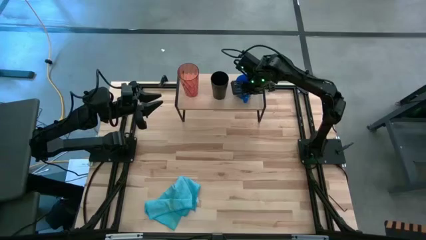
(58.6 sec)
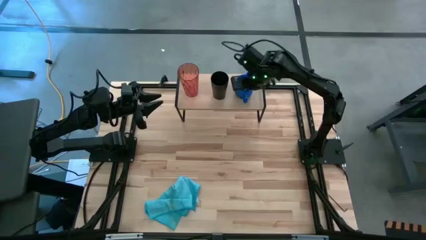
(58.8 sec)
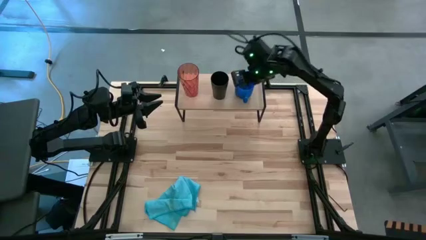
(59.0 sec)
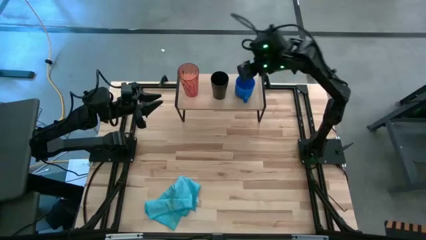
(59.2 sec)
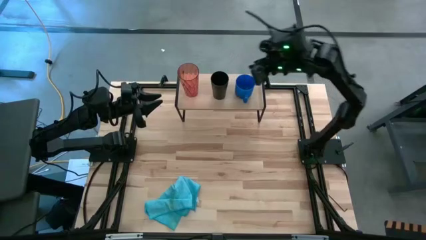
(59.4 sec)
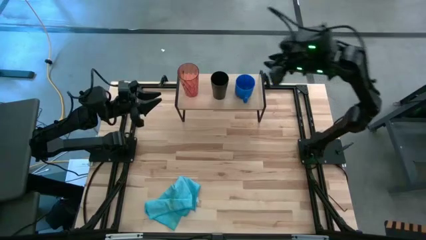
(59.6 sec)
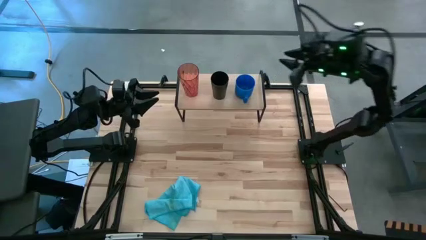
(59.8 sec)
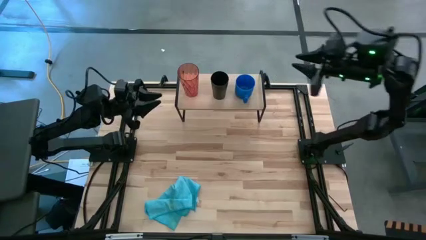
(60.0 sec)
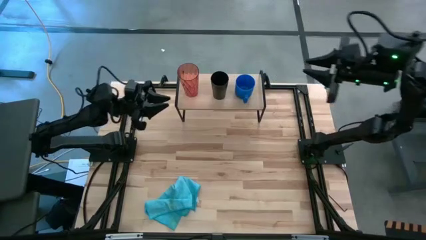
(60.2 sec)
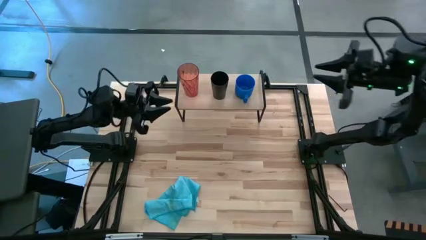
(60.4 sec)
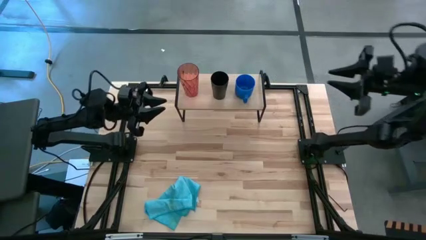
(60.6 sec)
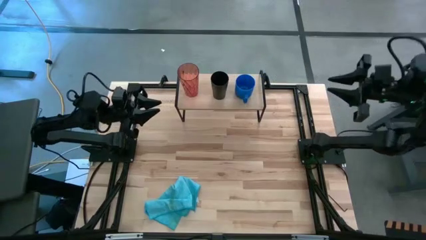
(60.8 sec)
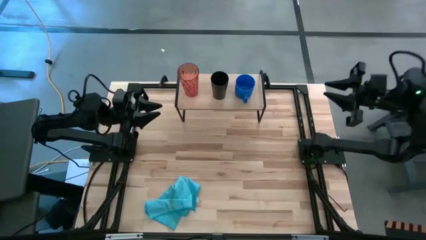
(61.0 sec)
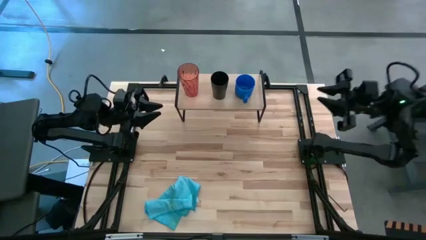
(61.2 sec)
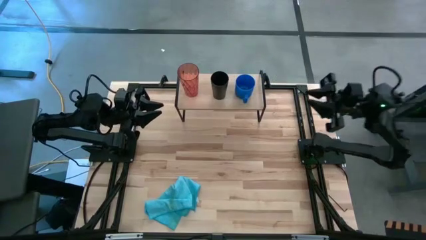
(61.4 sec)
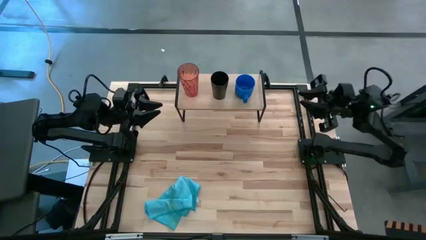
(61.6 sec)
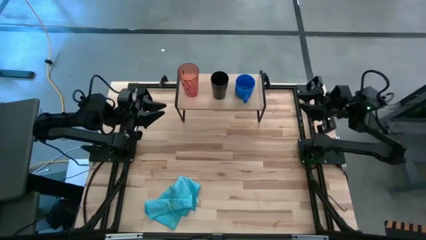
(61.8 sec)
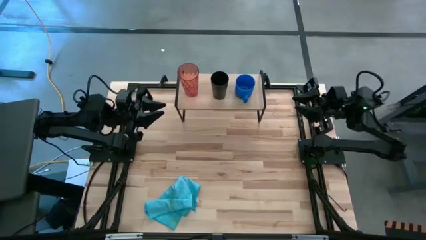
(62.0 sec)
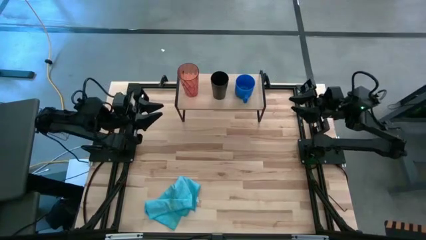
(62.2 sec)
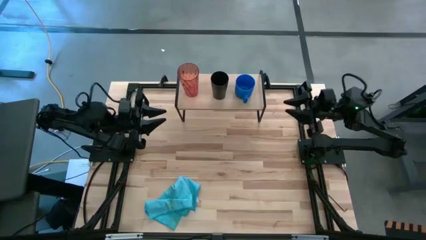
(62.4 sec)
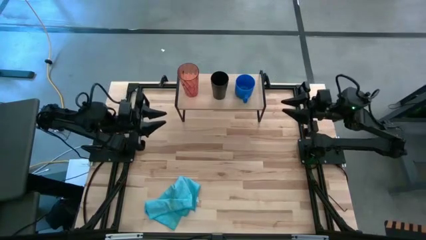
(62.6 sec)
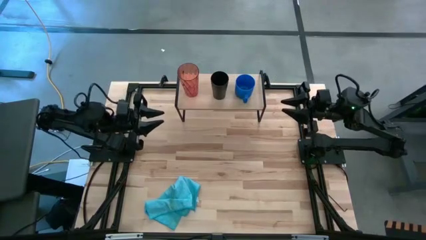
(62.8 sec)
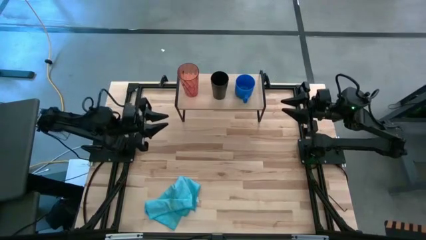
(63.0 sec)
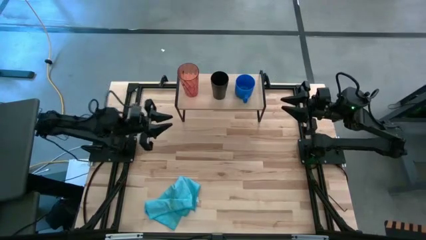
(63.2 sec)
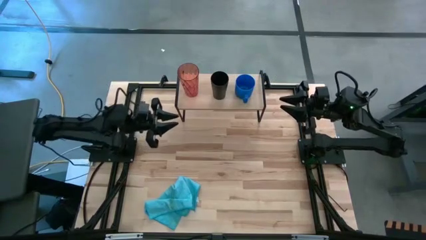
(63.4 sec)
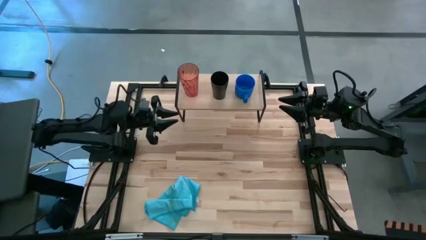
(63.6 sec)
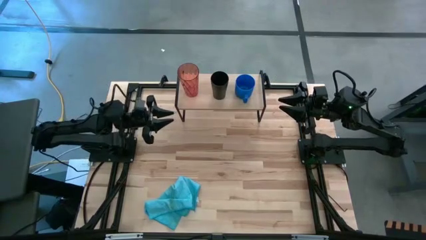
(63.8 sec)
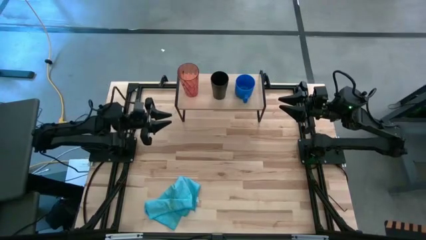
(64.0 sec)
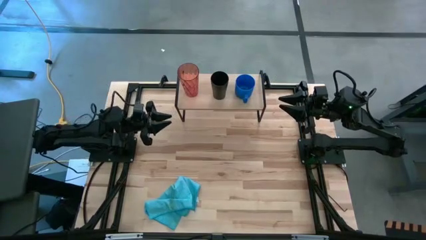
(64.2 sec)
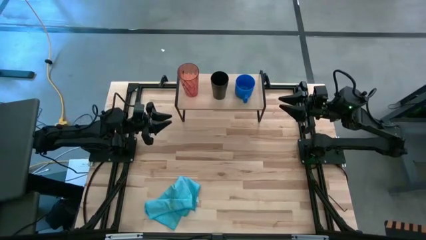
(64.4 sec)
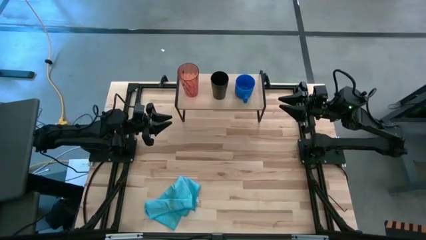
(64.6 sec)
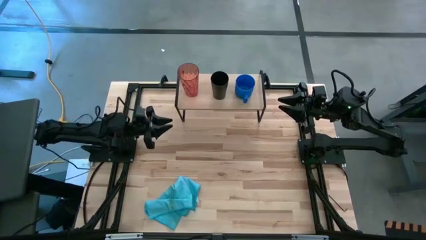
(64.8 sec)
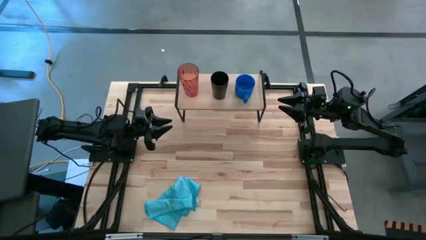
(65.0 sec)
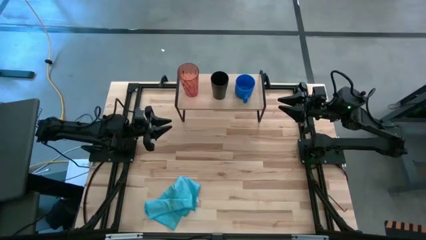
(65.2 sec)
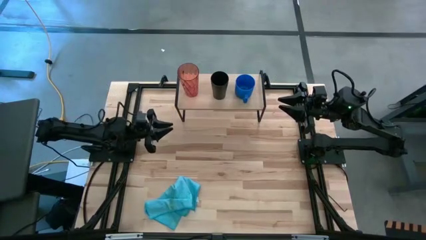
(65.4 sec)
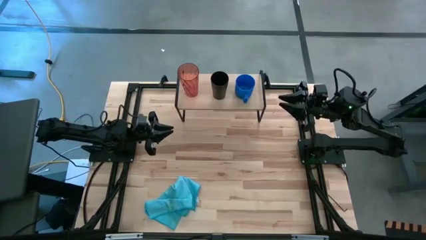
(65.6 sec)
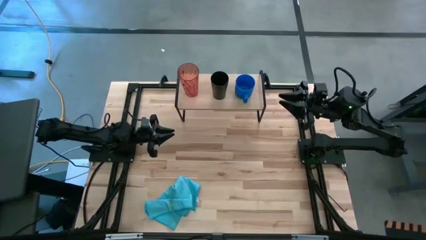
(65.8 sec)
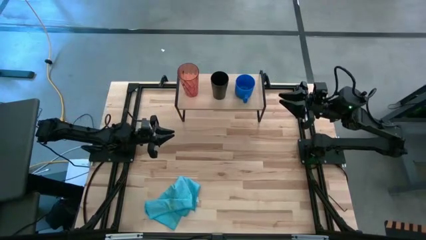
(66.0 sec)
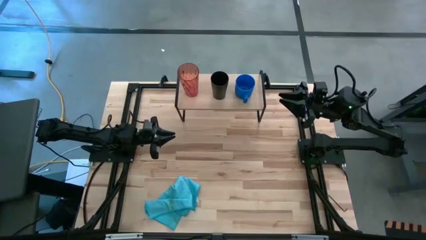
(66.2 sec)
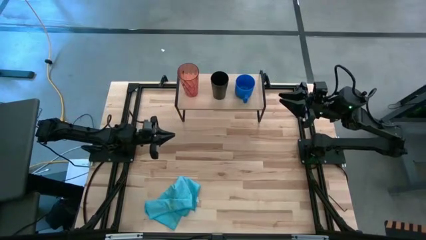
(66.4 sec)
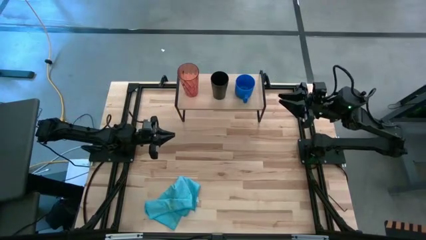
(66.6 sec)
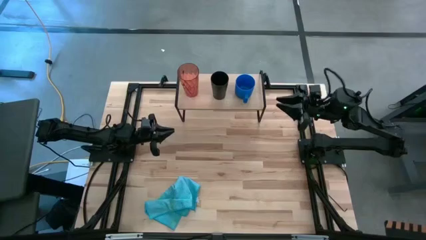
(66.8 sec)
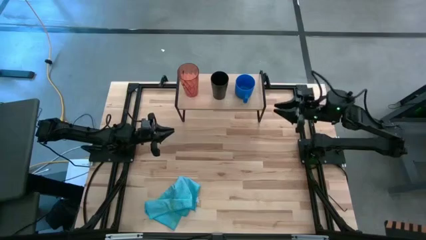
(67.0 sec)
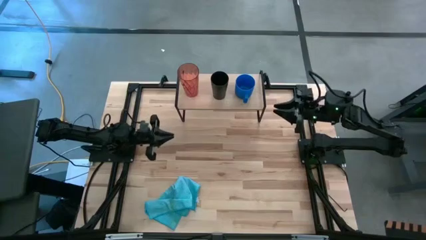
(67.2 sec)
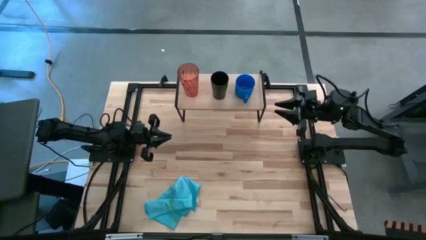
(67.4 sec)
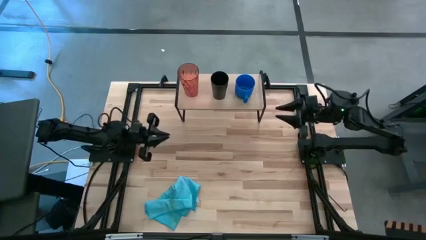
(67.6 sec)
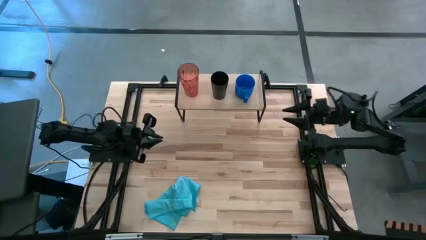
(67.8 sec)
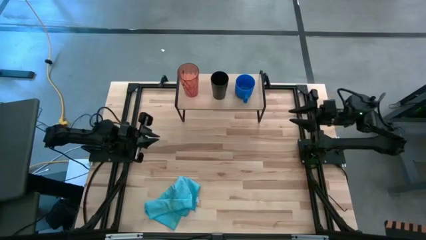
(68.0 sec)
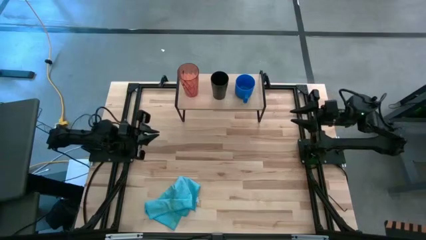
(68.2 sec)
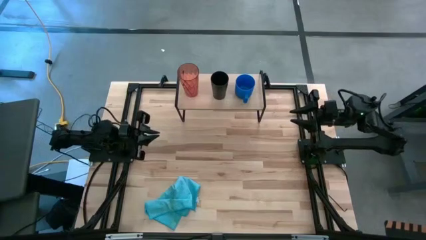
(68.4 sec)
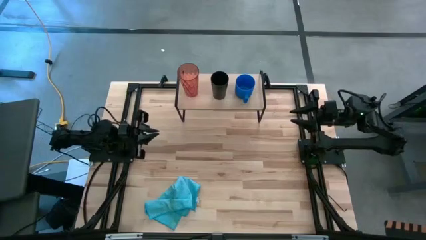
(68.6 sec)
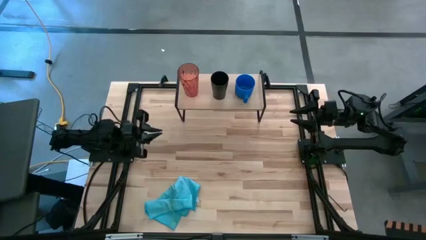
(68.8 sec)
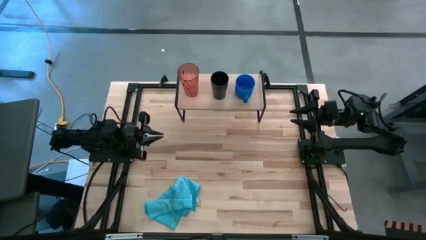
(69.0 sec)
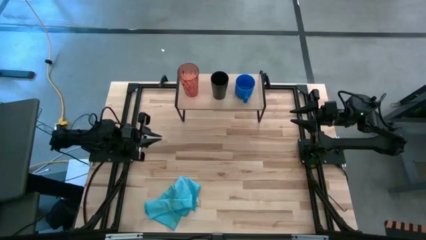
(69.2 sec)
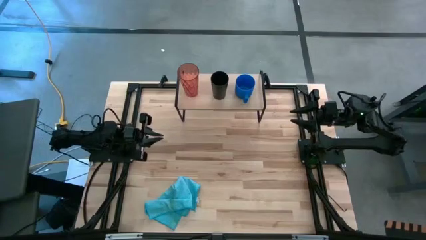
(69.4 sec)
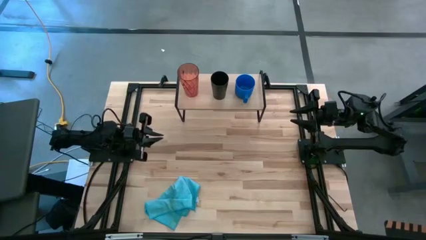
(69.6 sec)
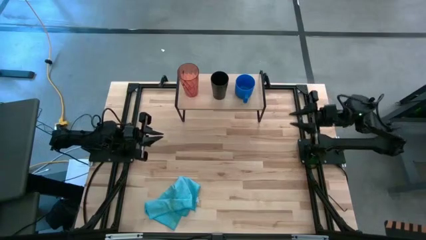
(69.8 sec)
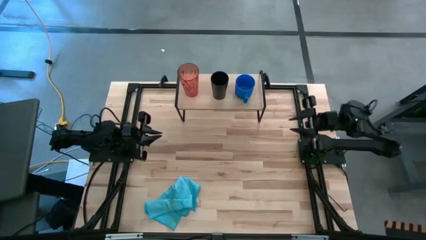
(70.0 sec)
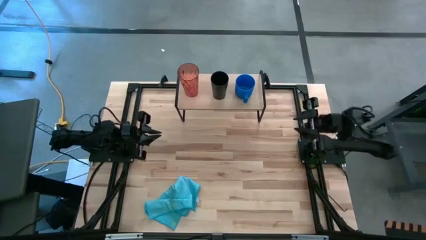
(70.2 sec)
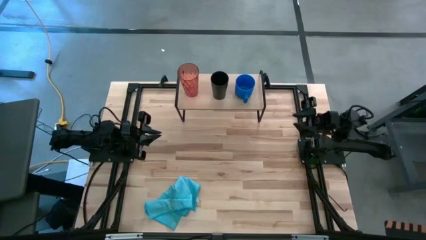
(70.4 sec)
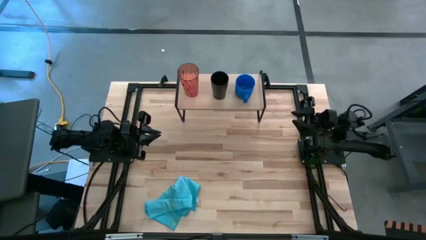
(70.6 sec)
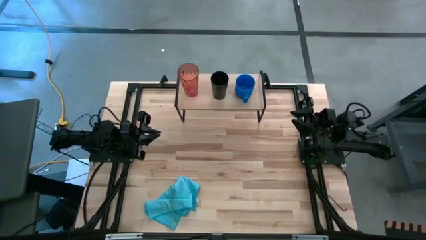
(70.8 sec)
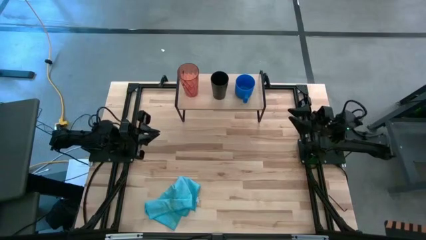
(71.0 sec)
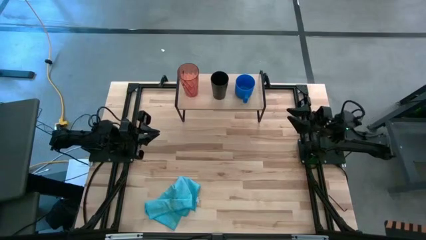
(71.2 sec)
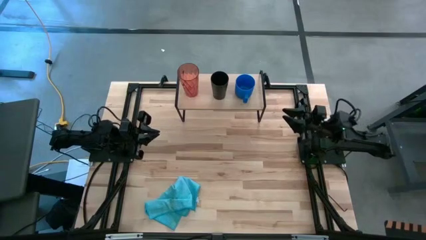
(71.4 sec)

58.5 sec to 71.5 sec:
Task: Stack small to large cups/mugs on shelf
Return to Home Position
